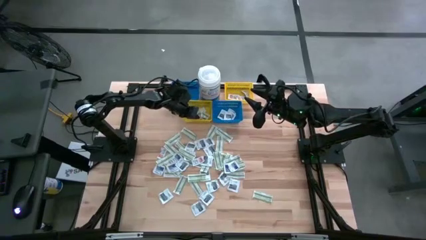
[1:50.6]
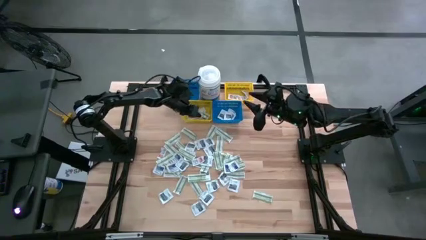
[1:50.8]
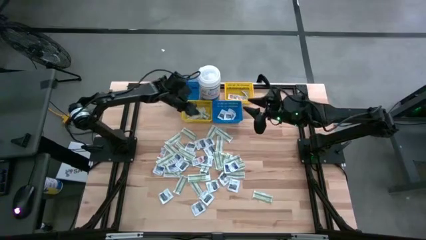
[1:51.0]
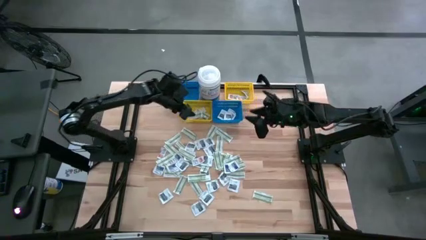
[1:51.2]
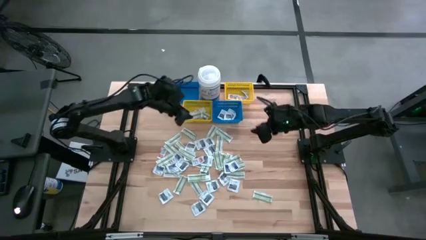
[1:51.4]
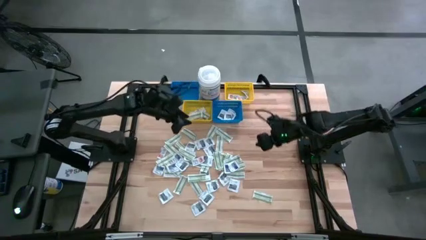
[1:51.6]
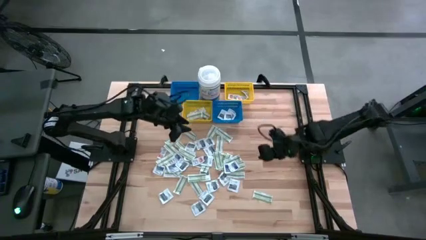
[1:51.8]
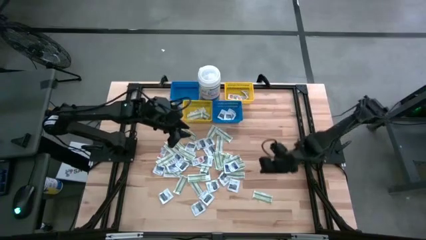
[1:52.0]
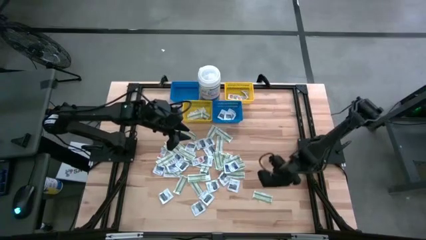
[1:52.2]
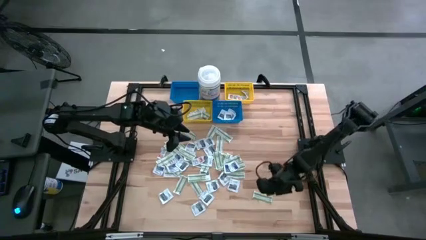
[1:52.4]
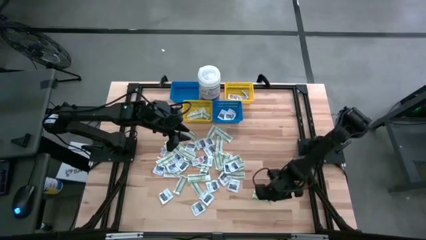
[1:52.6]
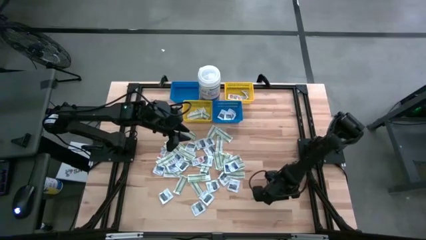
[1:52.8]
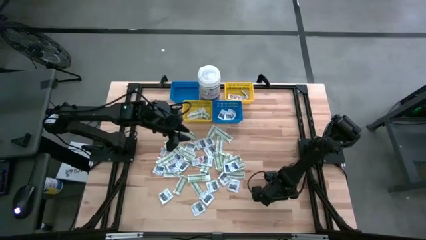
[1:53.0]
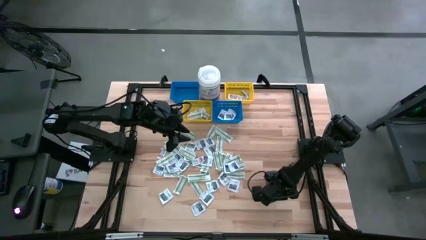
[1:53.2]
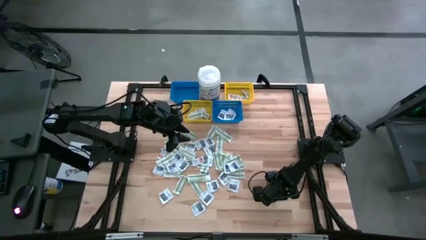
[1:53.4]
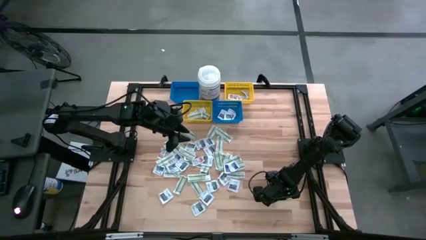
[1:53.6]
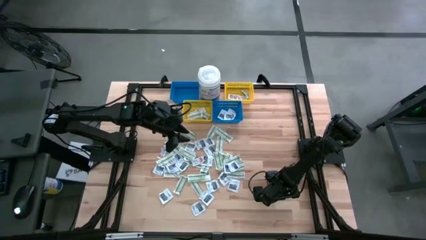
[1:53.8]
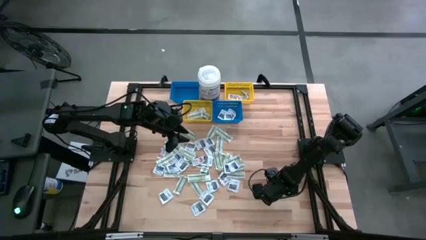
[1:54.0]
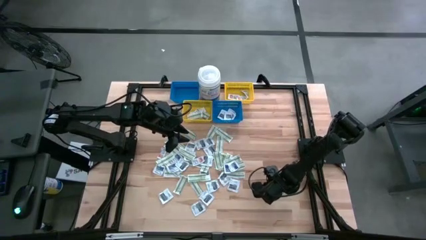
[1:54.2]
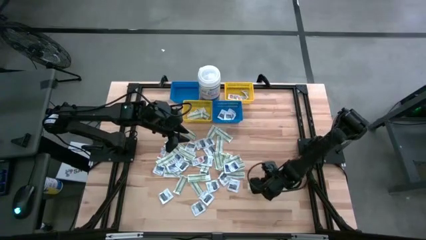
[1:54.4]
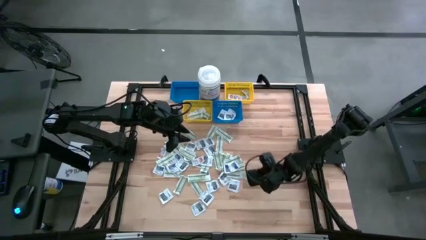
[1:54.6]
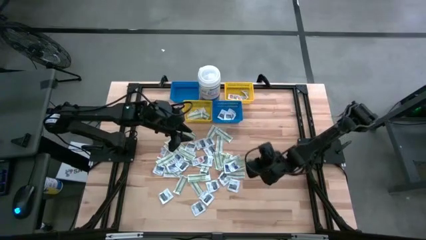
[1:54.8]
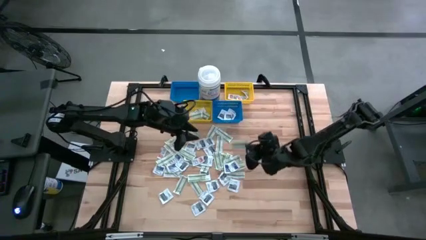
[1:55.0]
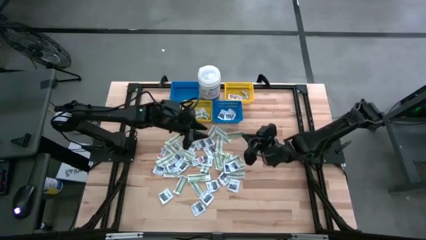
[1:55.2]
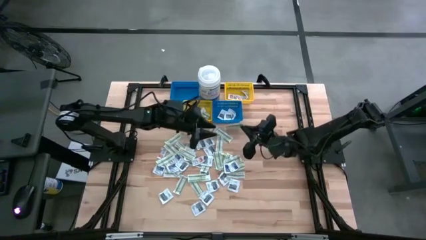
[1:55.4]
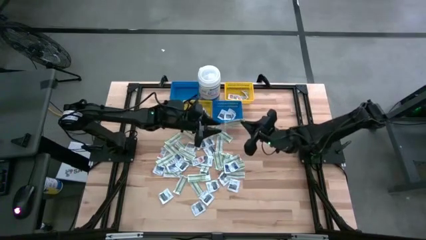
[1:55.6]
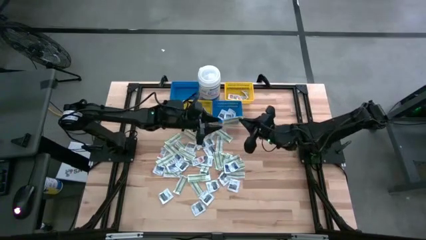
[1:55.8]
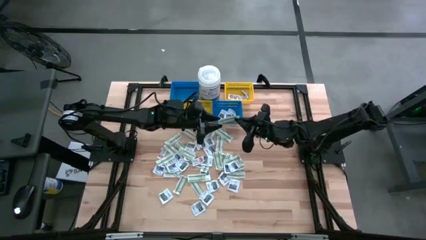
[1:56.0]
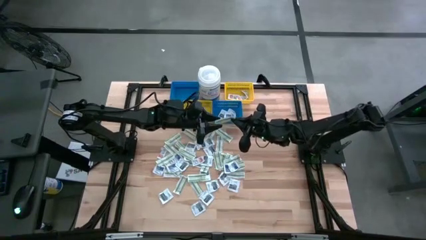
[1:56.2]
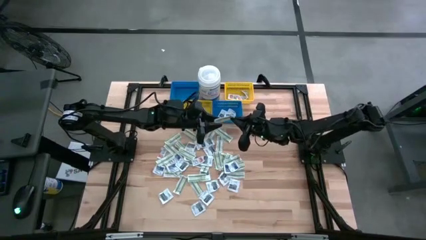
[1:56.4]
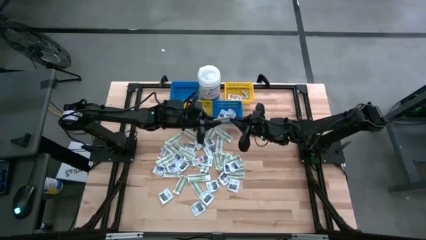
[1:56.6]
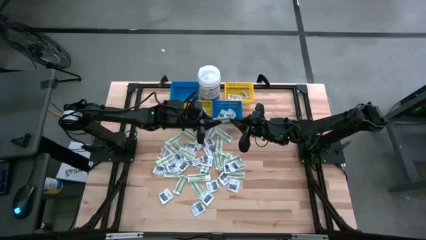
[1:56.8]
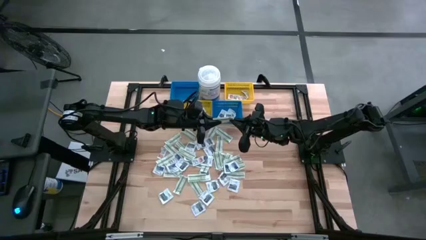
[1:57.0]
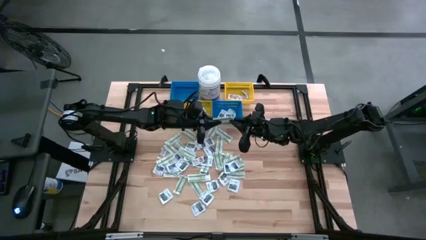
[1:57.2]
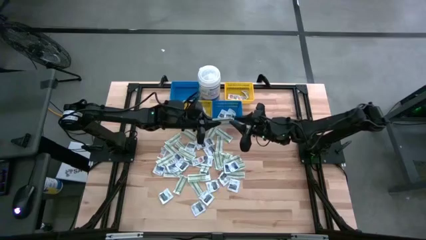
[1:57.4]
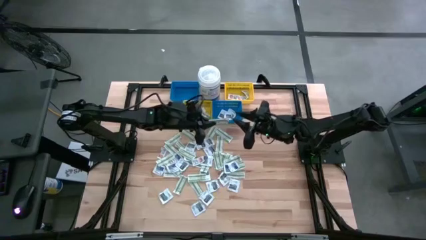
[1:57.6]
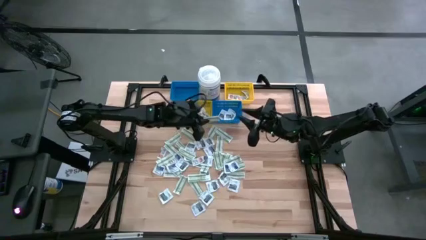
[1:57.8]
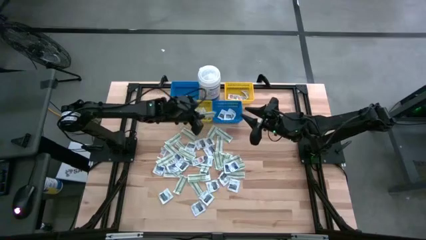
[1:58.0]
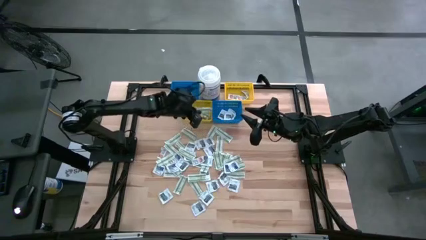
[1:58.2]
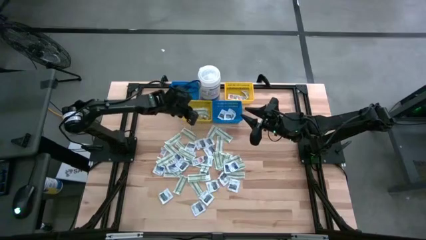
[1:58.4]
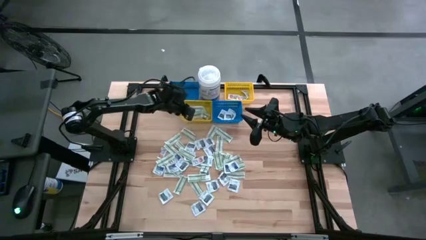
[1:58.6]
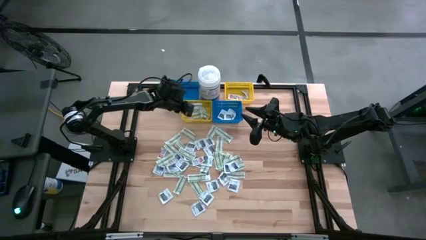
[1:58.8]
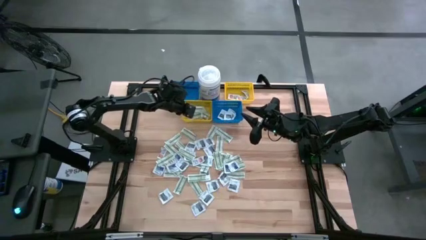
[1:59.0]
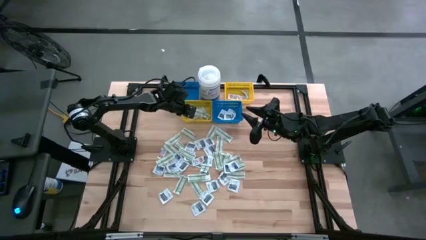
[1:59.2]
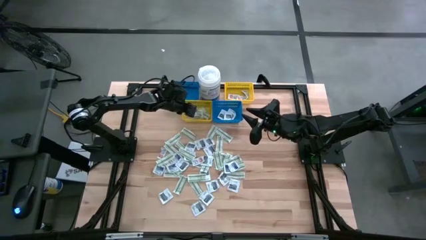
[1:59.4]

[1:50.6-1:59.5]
Task: Pick & Place First Aid Supplies
Put the green bandage pad into the left yellow bin

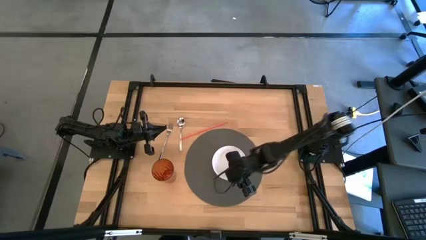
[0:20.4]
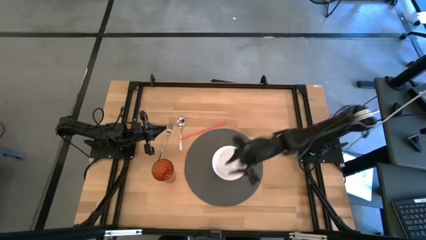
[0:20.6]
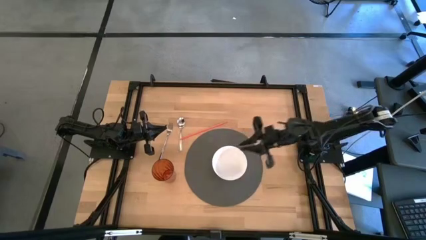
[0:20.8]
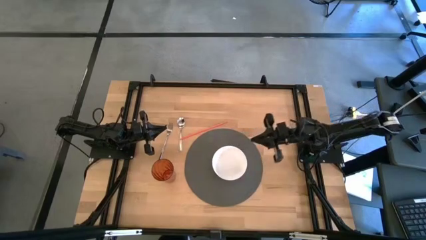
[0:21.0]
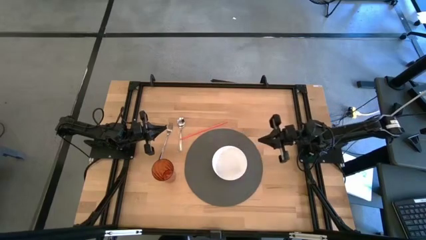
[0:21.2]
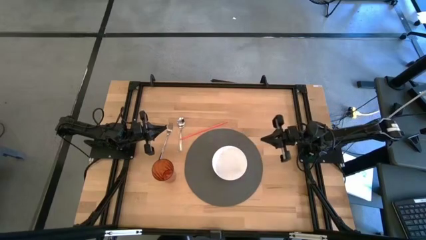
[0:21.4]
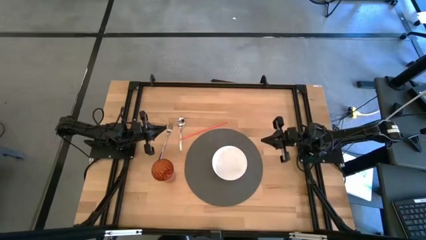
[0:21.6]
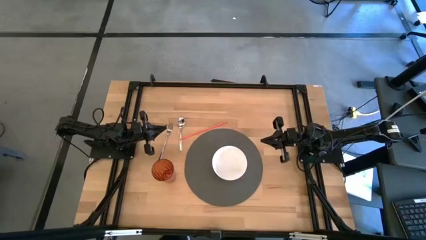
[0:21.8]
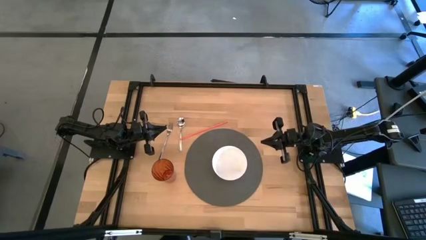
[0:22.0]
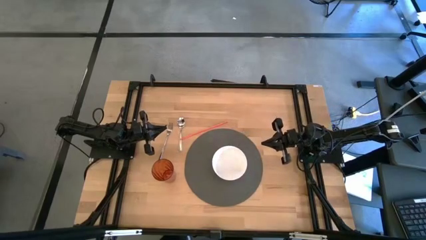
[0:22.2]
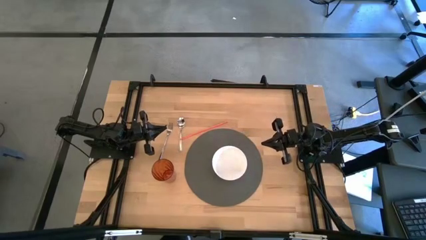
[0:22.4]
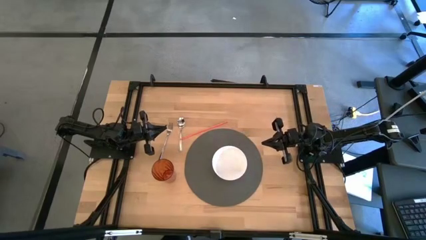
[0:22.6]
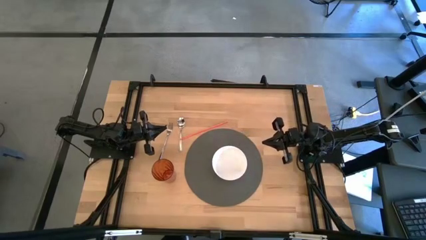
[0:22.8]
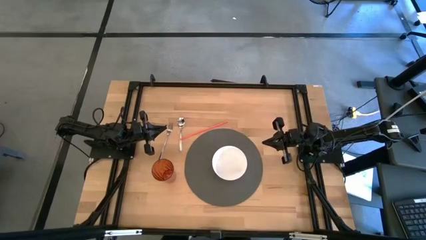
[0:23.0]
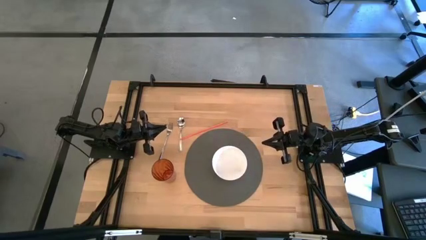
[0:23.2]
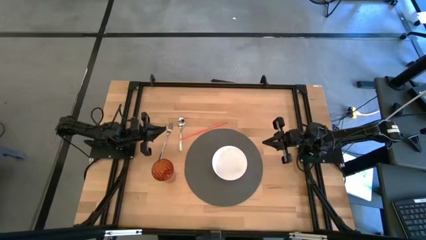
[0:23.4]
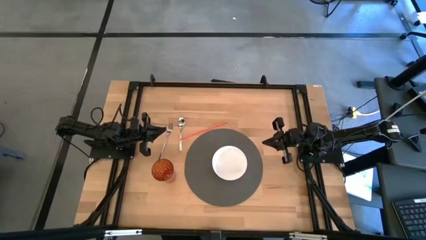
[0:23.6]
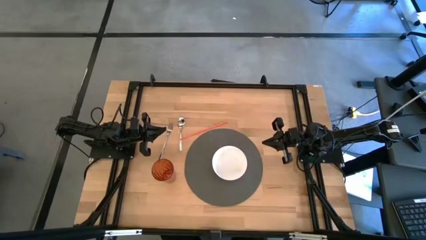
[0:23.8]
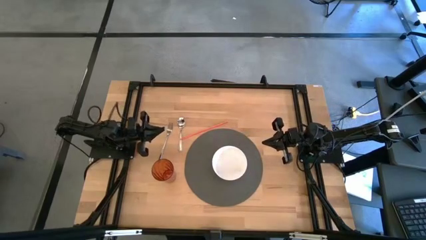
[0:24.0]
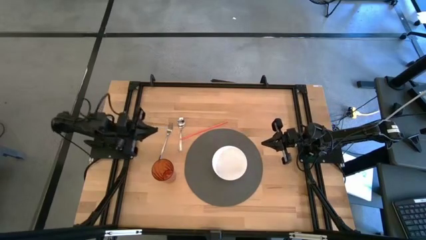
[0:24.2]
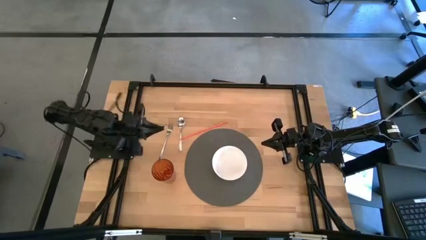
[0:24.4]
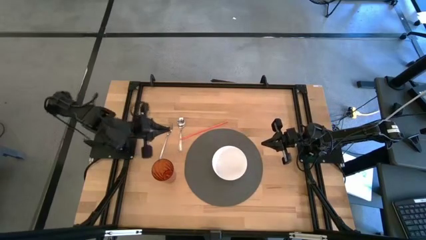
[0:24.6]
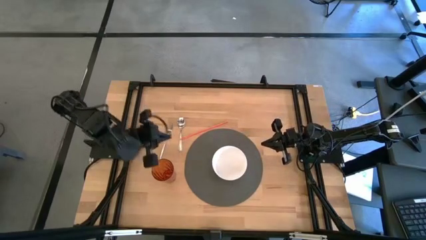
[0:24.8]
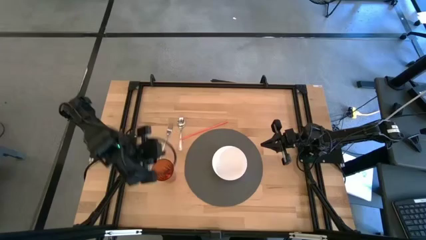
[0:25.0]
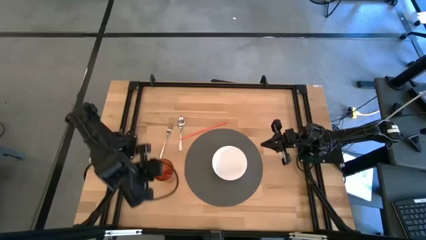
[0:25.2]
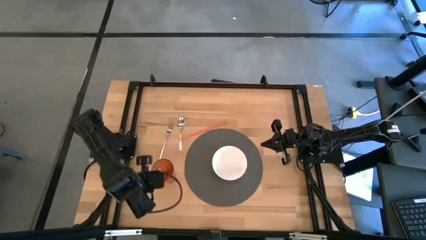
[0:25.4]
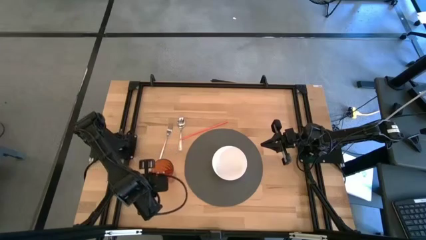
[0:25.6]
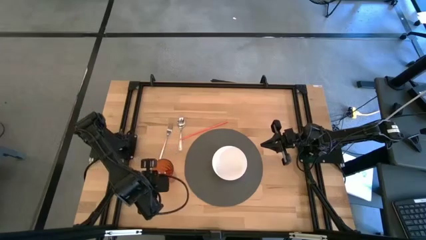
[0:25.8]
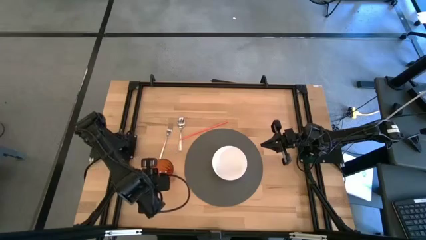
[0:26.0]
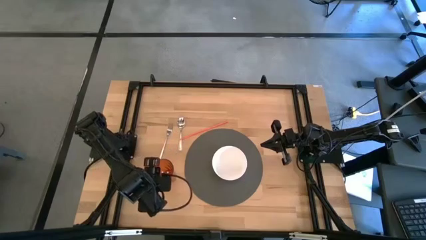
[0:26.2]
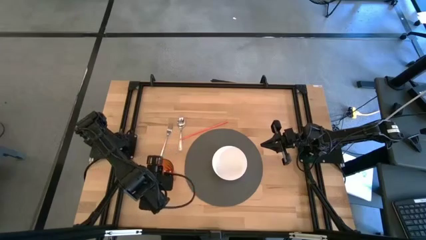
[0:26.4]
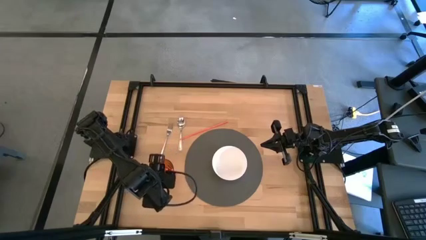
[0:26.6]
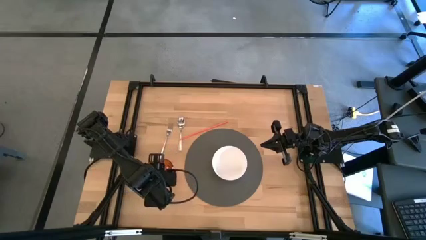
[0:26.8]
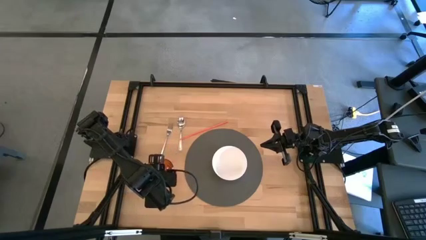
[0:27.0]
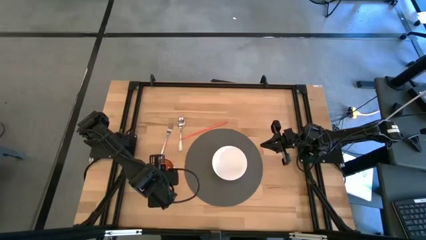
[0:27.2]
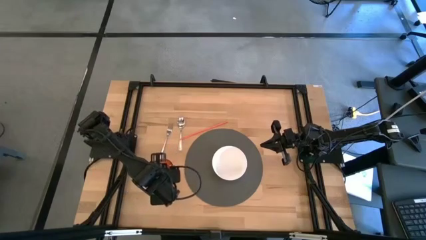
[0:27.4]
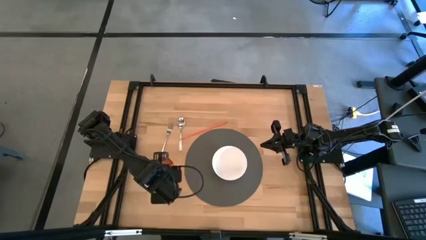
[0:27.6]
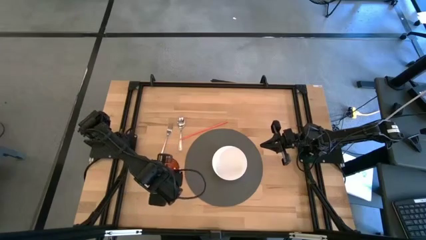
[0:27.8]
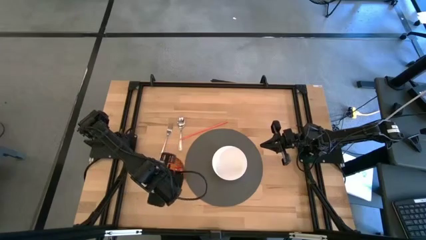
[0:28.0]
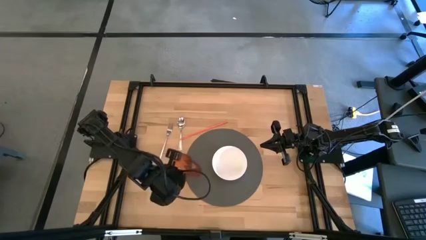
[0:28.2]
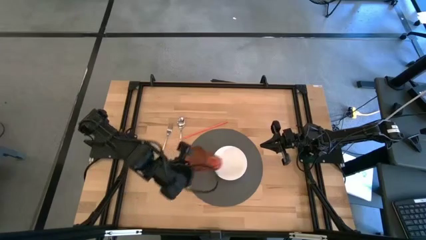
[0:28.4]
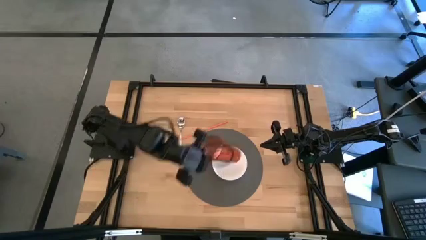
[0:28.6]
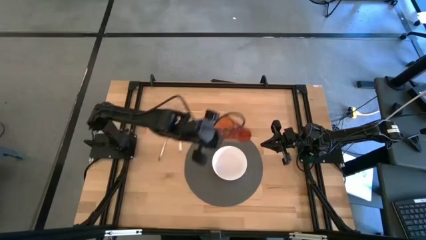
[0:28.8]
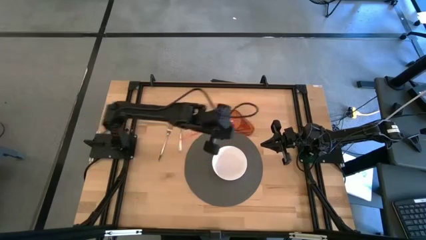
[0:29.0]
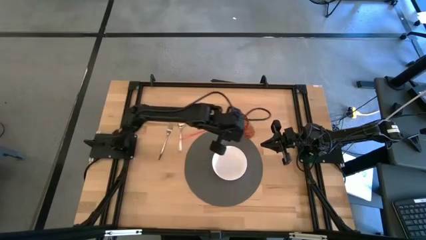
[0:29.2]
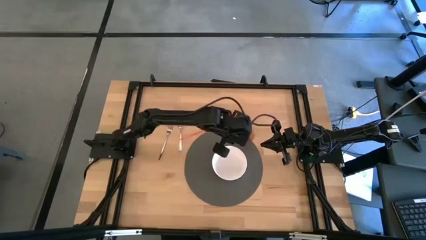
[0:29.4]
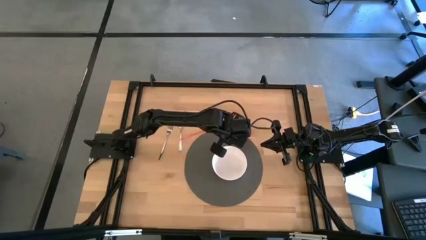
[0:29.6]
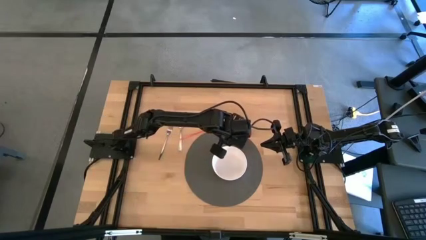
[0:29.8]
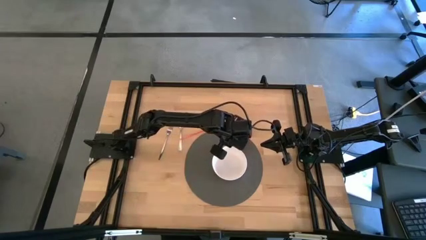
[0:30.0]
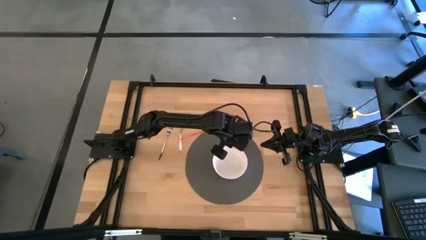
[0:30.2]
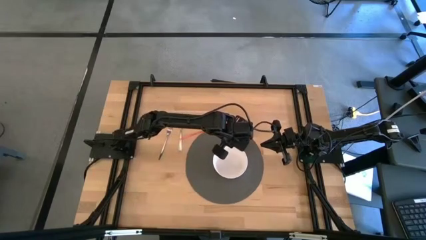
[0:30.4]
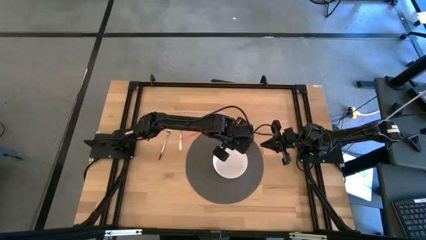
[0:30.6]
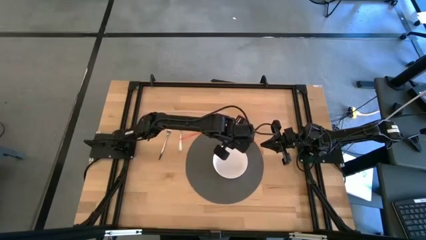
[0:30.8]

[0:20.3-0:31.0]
Task: Pick & Place Utensil
Put the orange cup on the gray mat to the top right of the white bowl
